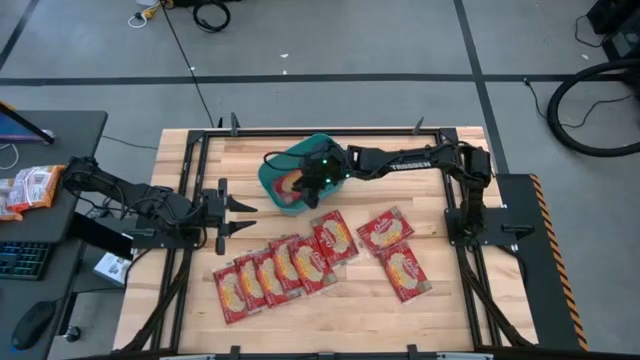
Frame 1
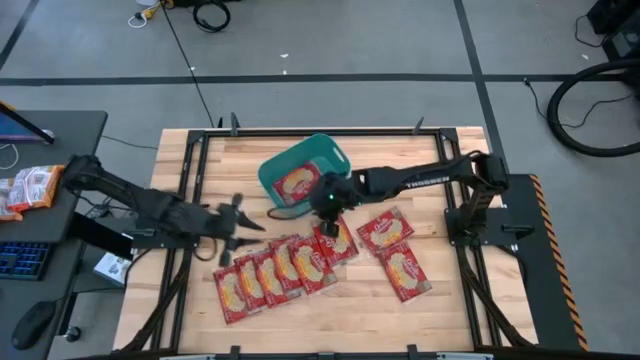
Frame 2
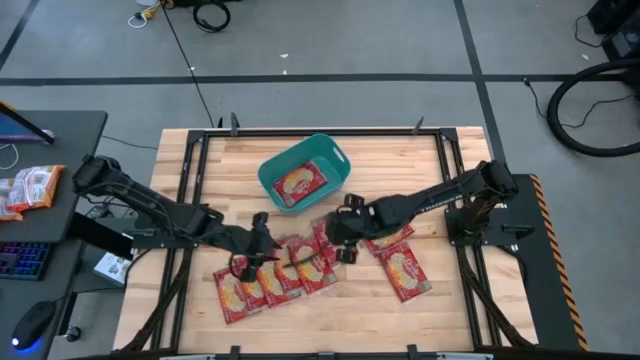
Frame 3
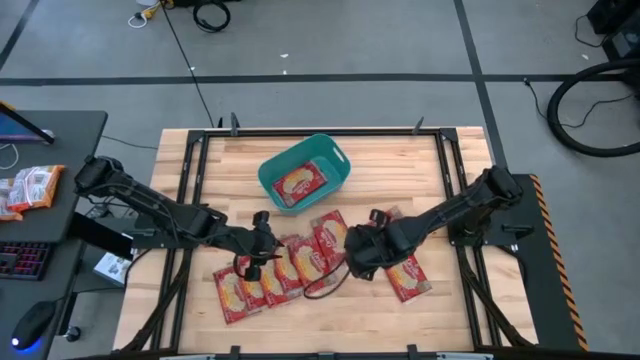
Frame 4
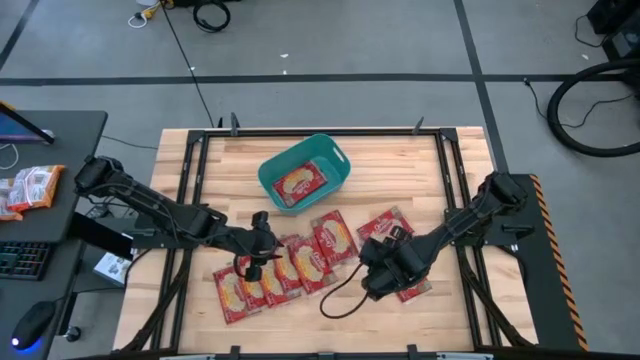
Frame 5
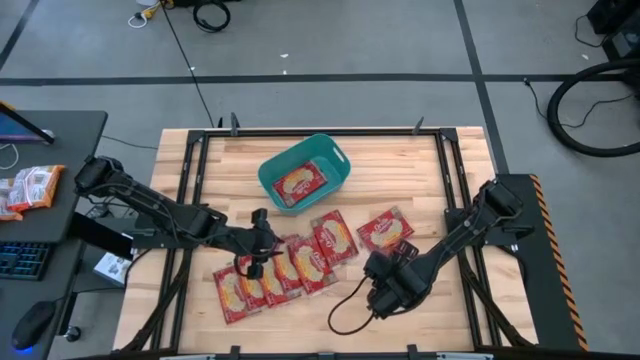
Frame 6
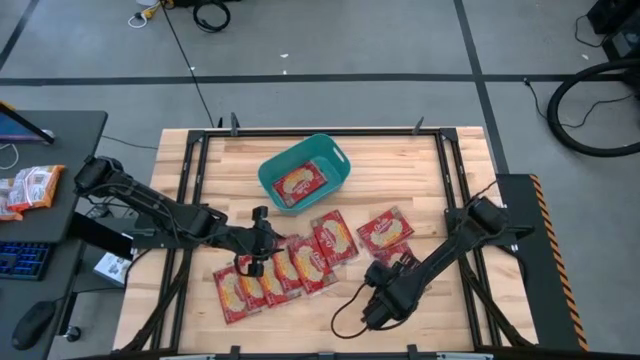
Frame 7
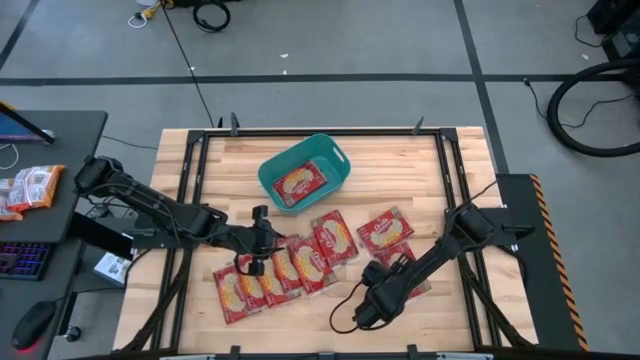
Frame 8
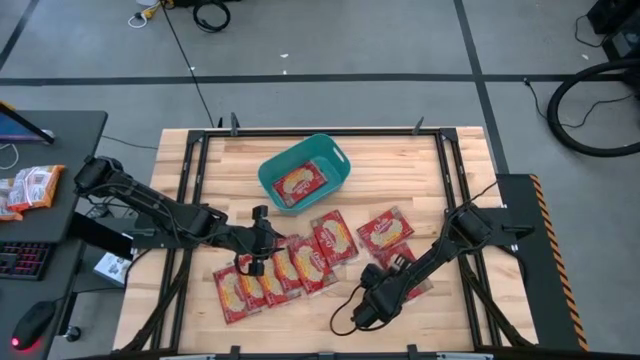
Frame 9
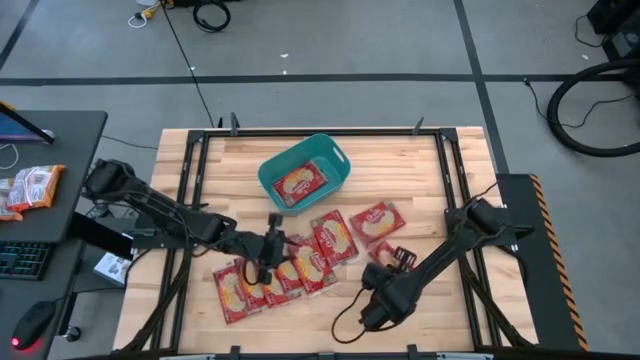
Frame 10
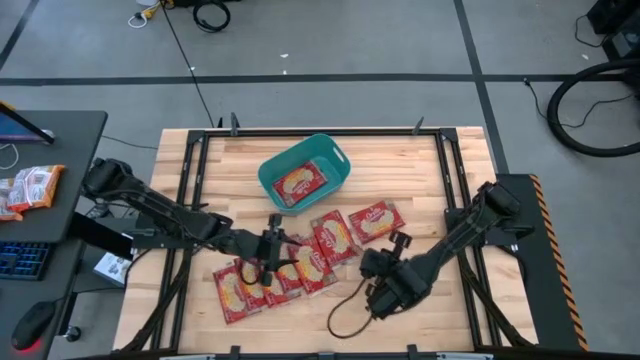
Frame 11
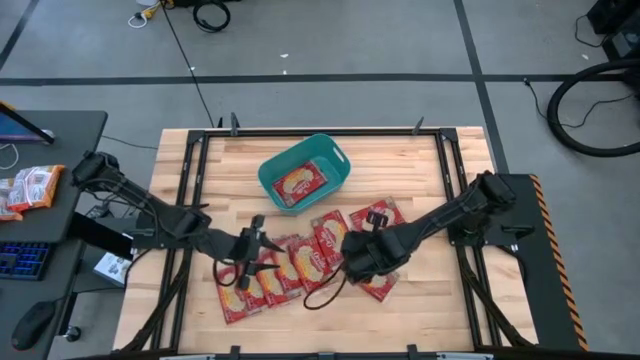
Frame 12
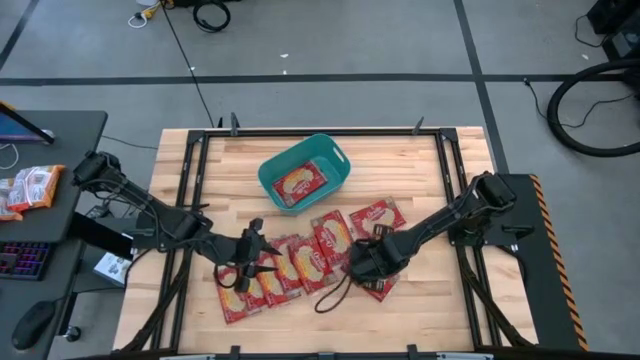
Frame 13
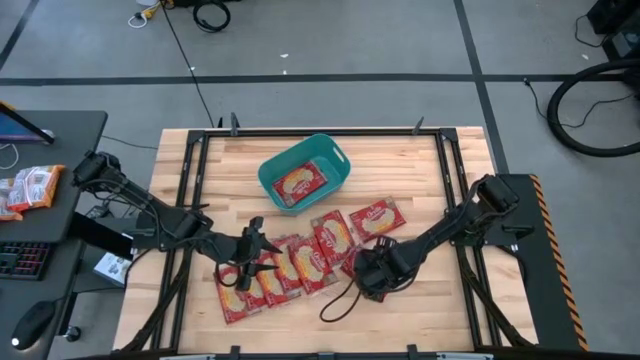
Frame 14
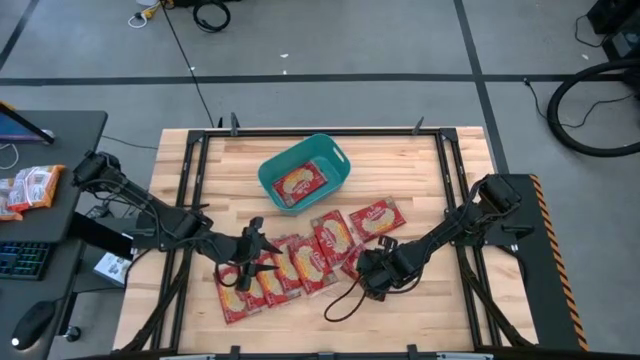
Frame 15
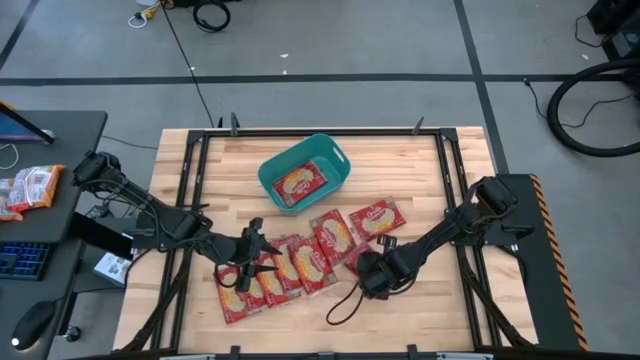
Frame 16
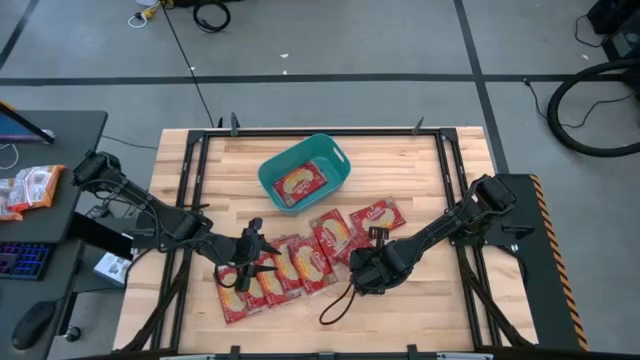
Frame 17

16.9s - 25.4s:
Task: Sort popcorn bags into baskets
Put the red popcorn bag into the green bin

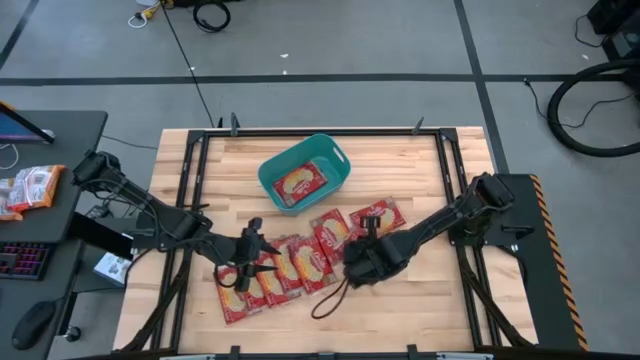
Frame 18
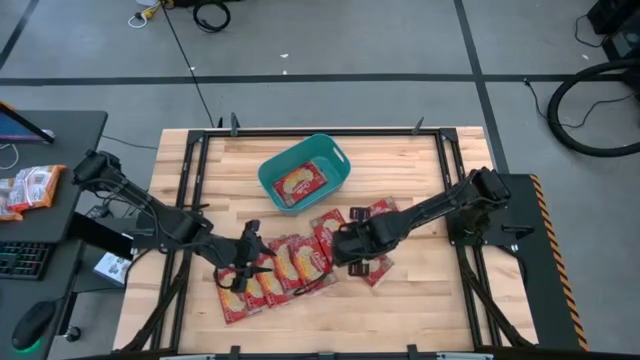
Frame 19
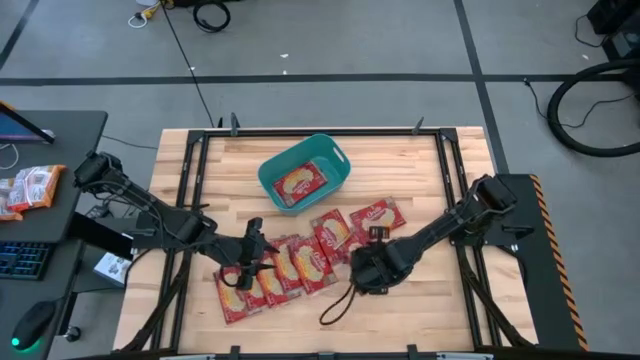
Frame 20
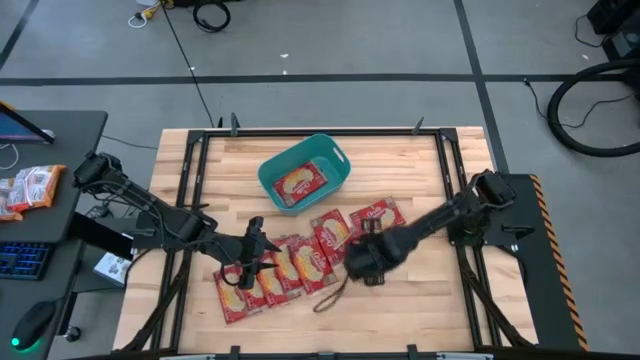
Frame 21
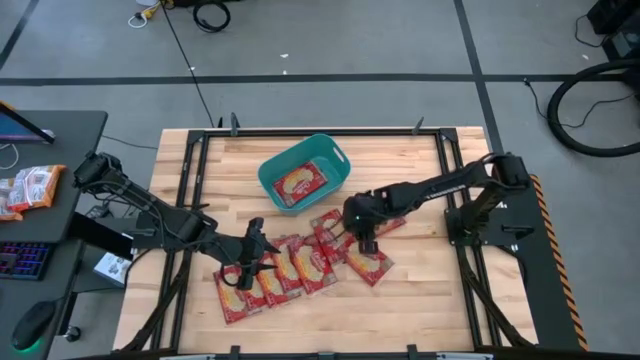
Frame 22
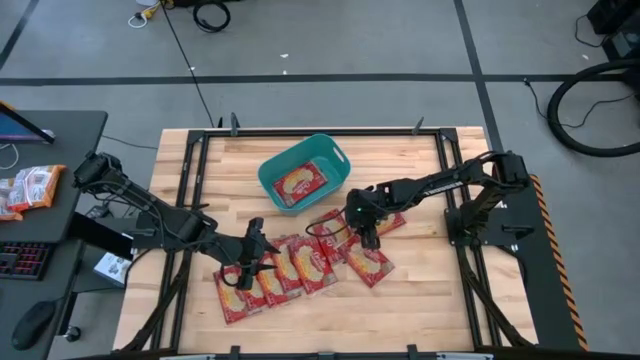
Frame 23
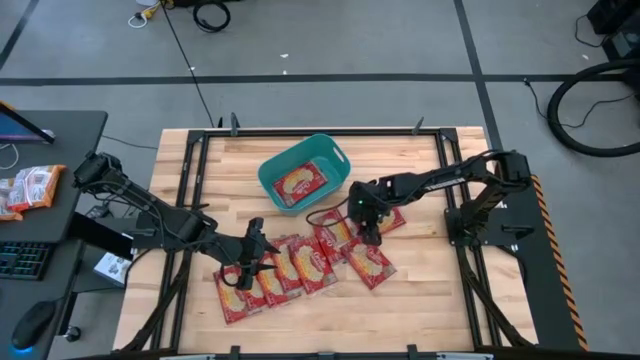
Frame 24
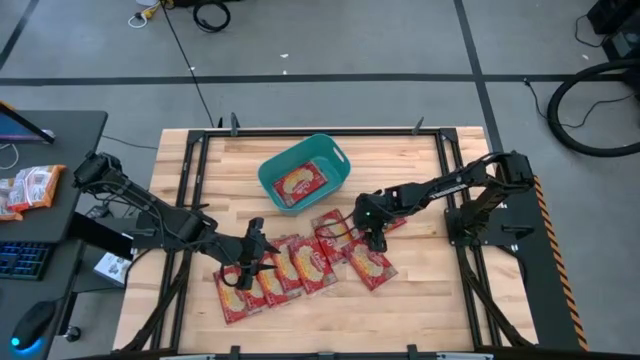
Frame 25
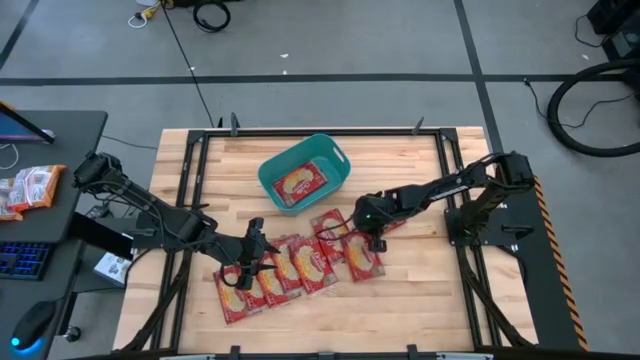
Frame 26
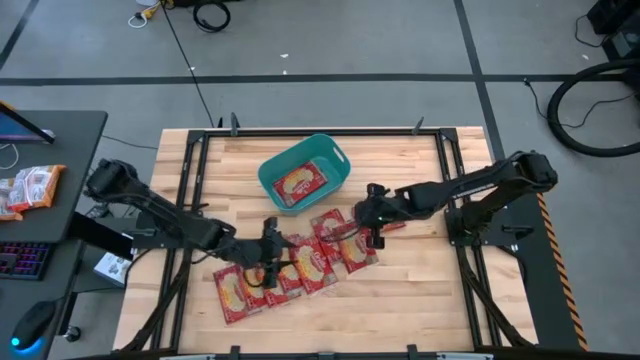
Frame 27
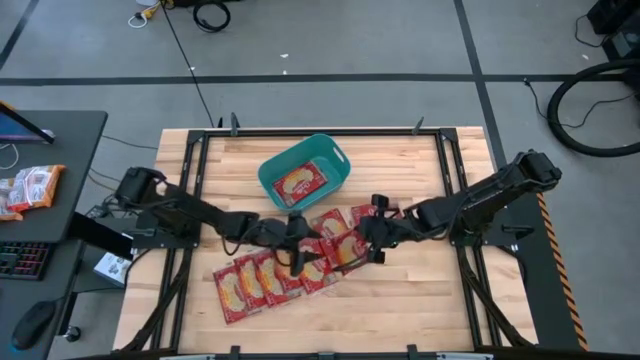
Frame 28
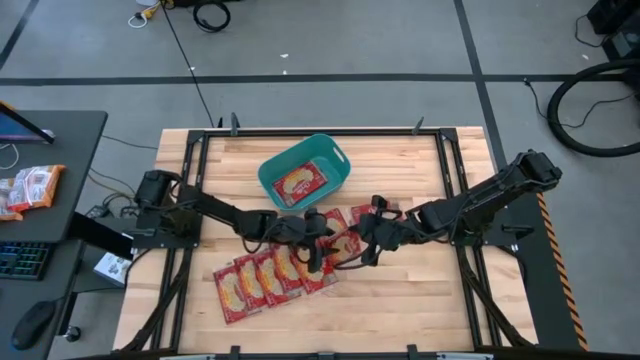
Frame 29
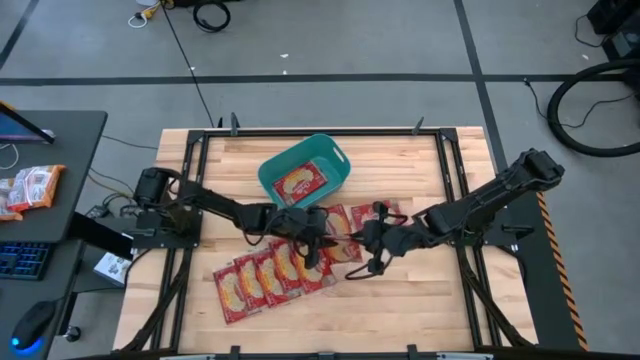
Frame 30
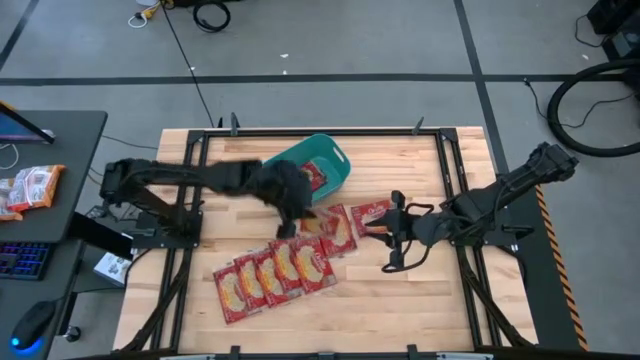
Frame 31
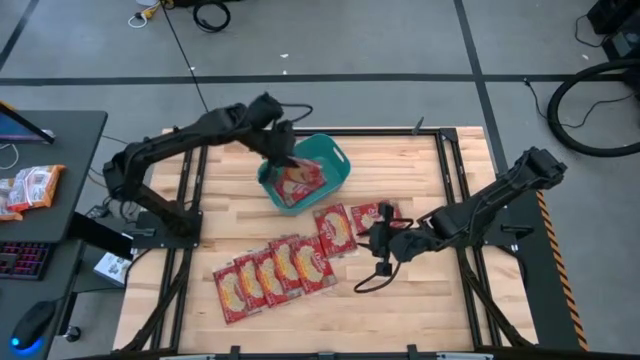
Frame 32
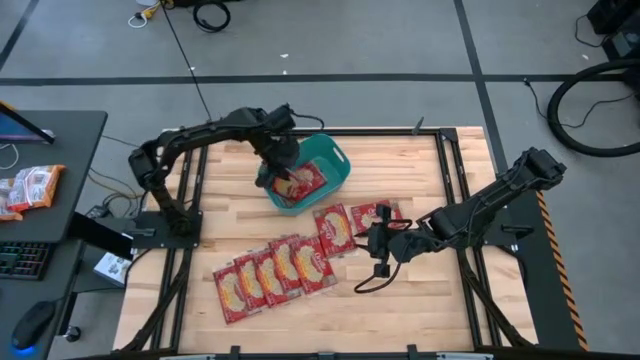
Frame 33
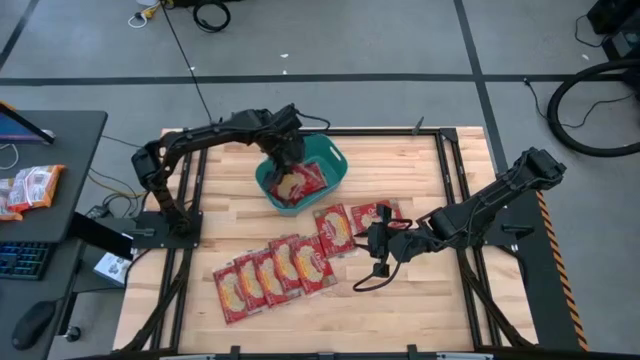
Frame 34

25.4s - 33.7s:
Put the red popcorn bag into the green bin

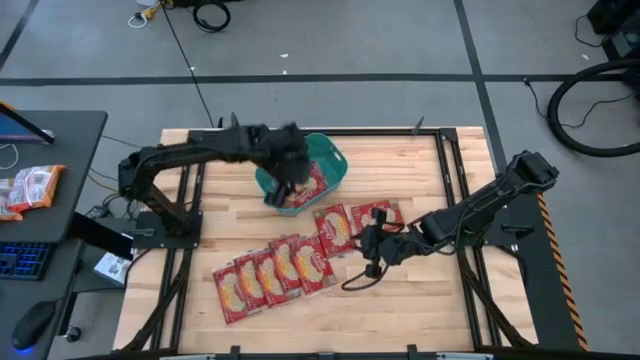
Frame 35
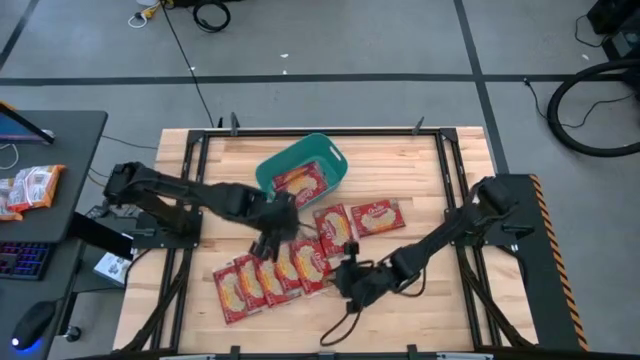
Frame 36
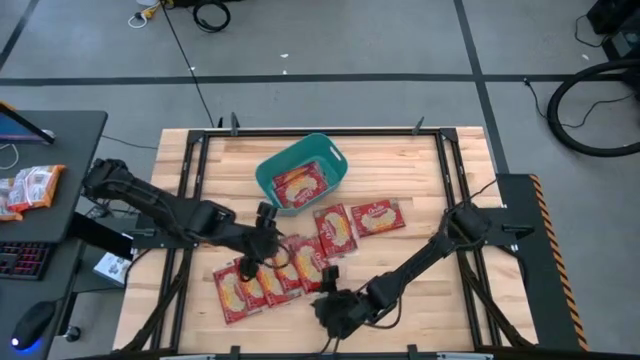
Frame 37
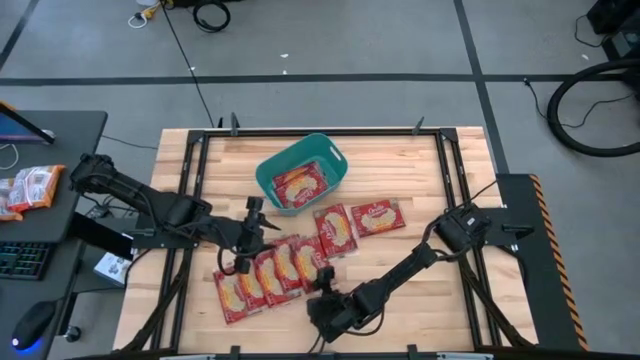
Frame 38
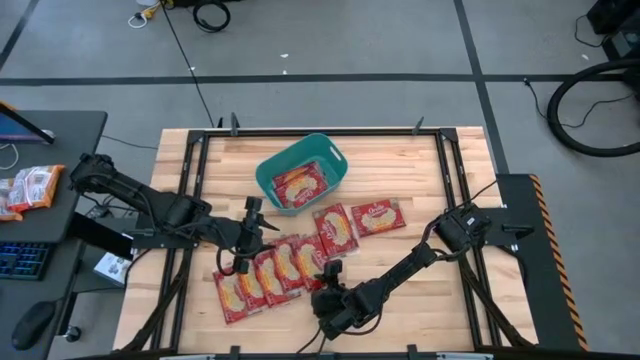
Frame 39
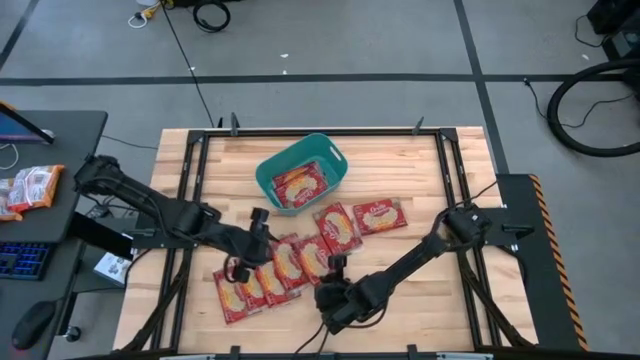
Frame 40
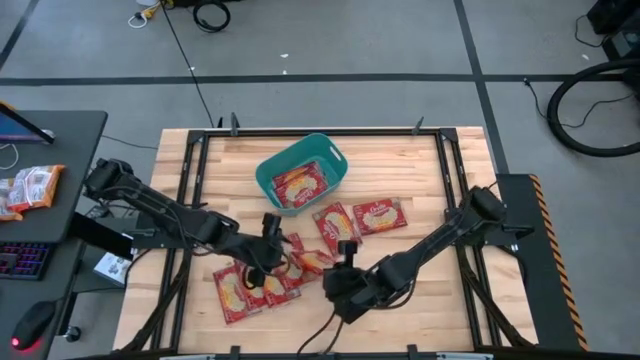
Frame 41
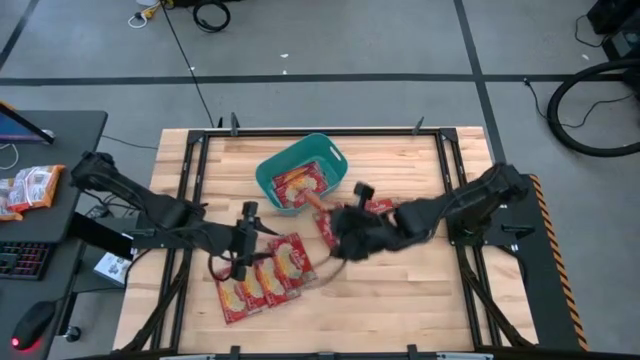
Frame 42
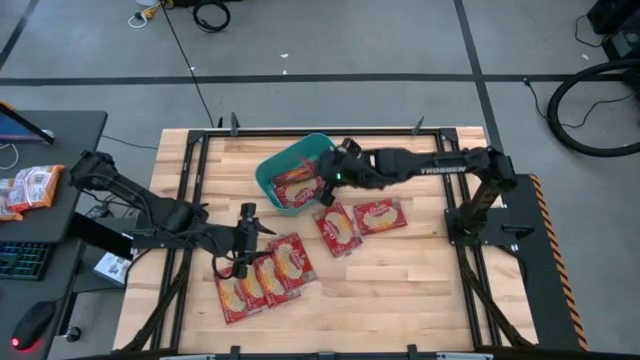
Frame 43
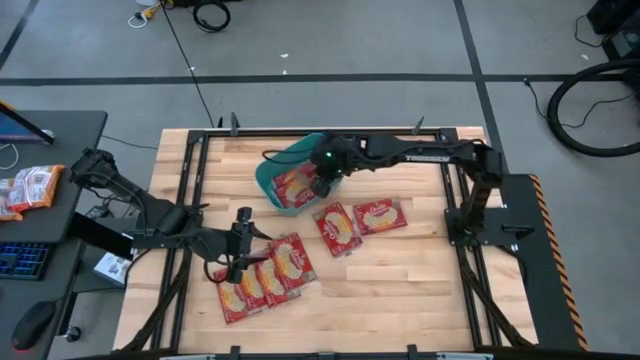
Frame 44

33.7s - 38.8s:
Put the red popcorn bag into the green bin
